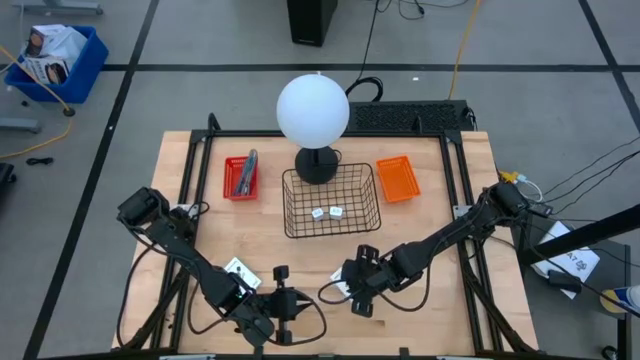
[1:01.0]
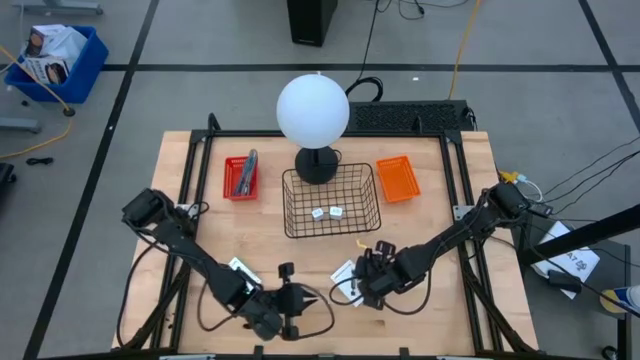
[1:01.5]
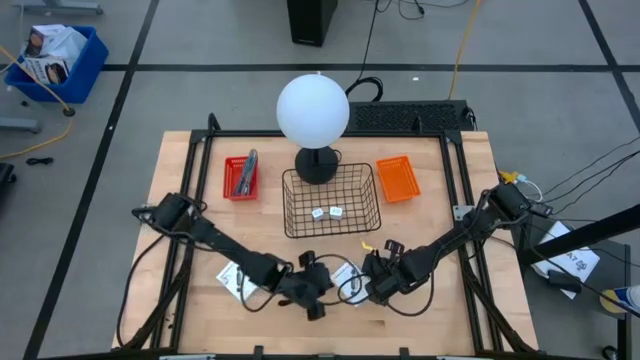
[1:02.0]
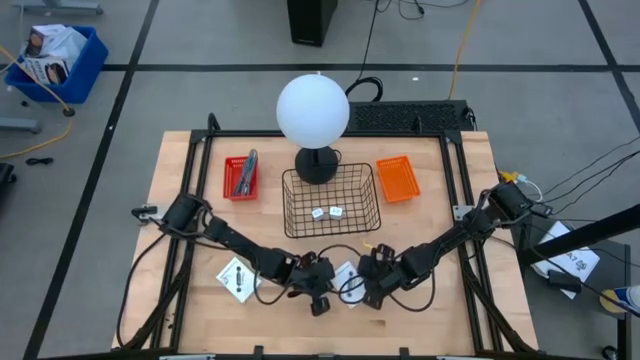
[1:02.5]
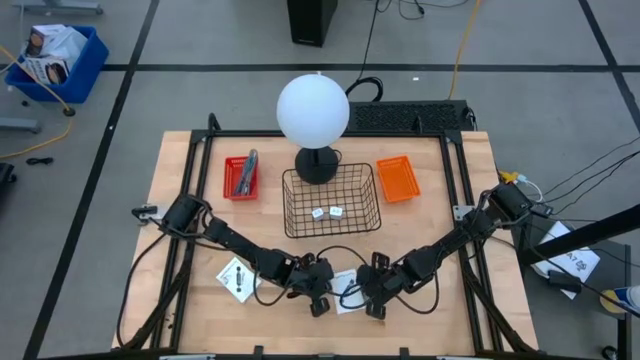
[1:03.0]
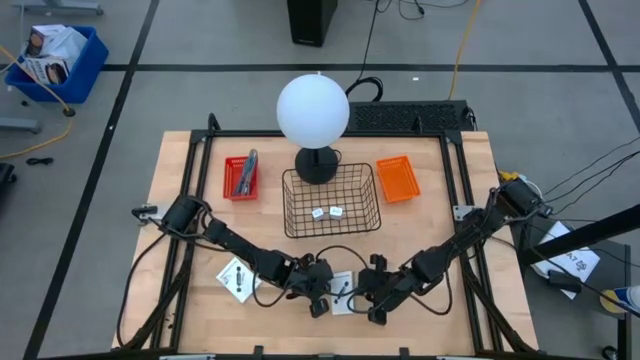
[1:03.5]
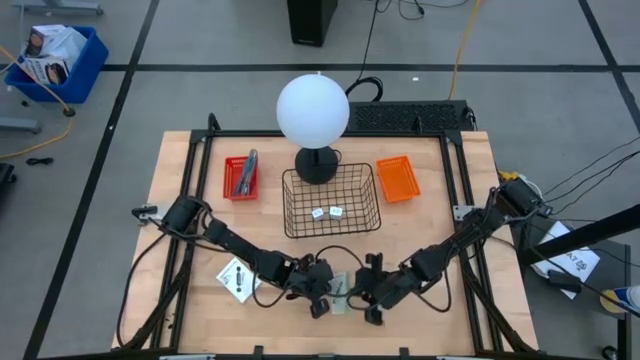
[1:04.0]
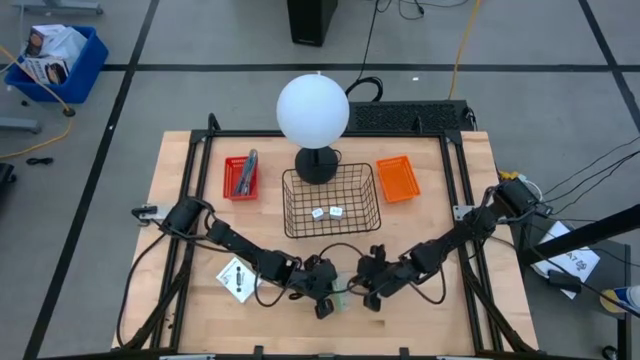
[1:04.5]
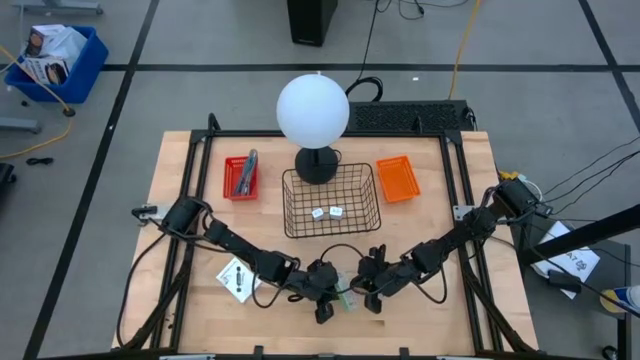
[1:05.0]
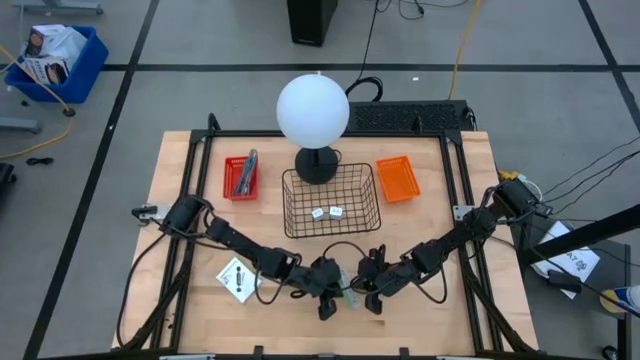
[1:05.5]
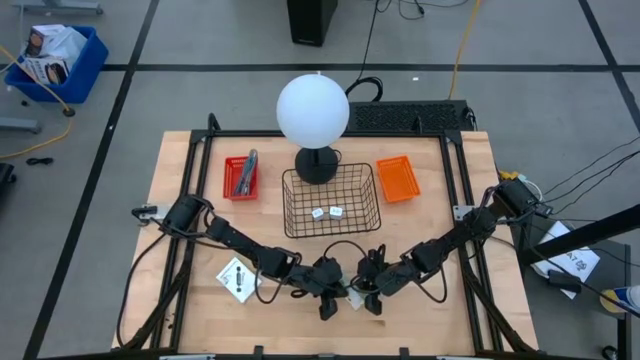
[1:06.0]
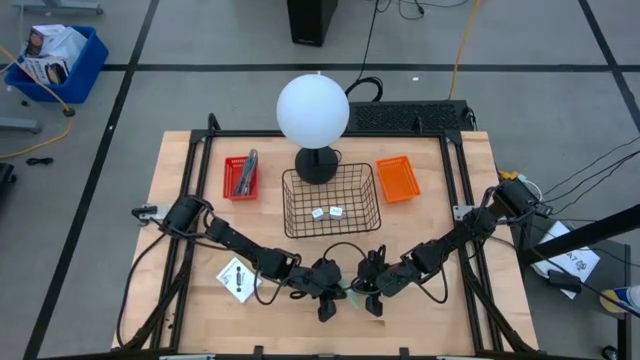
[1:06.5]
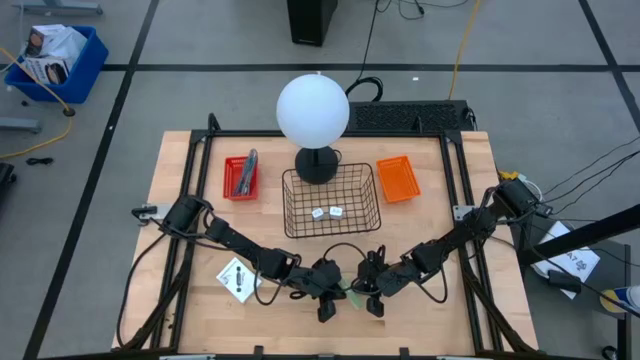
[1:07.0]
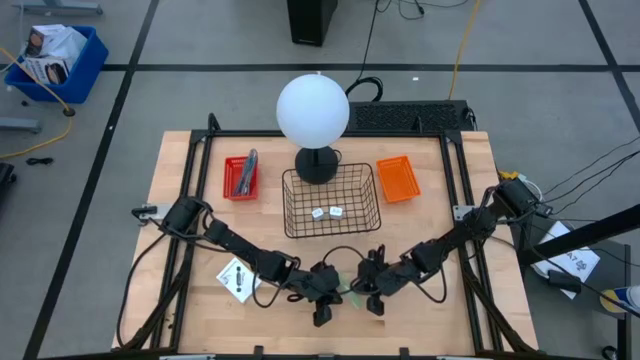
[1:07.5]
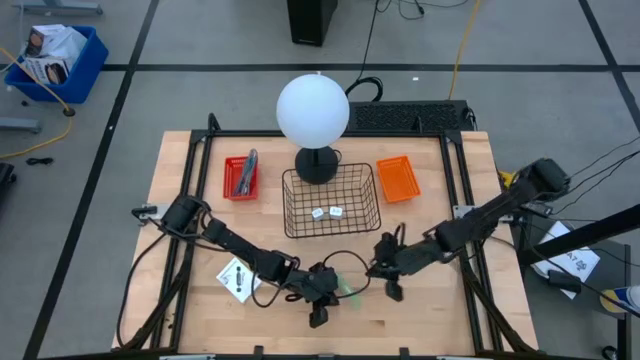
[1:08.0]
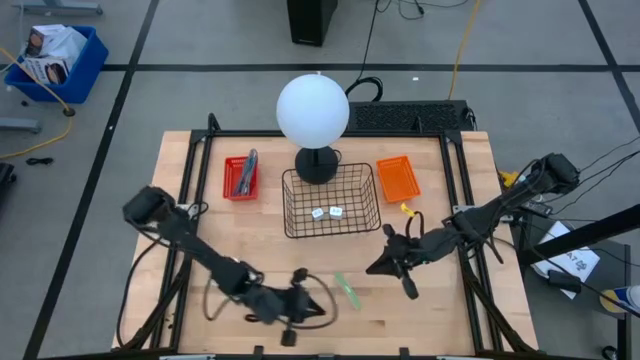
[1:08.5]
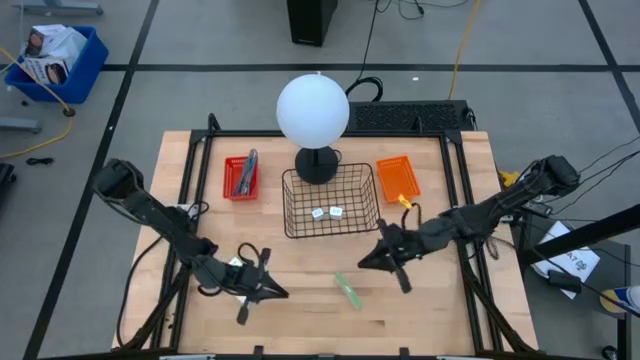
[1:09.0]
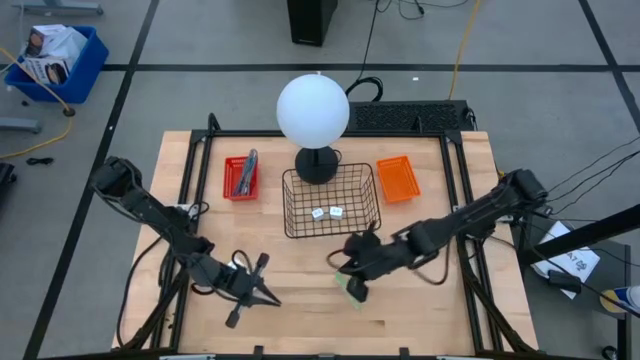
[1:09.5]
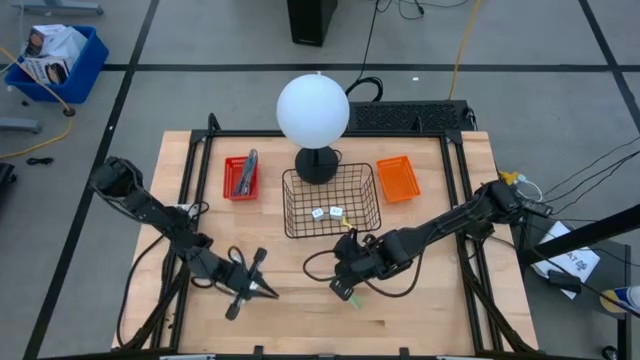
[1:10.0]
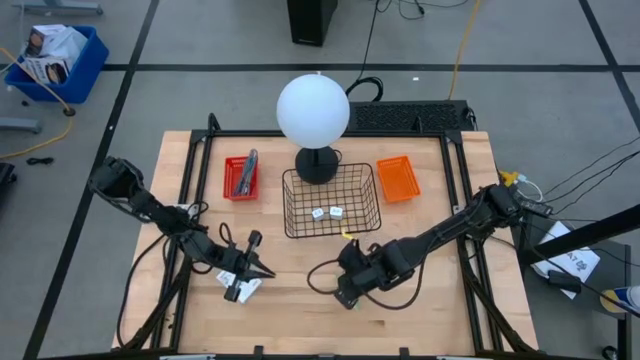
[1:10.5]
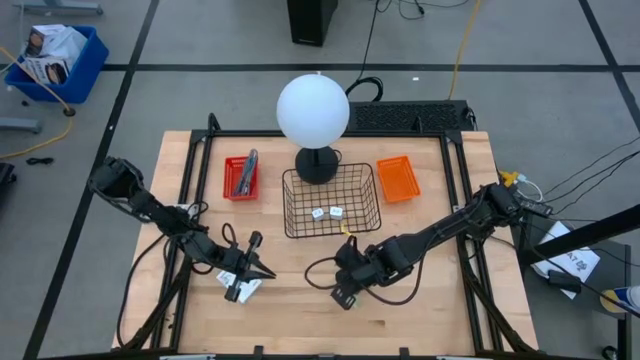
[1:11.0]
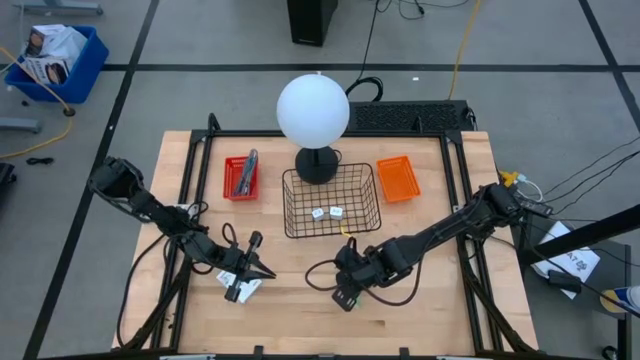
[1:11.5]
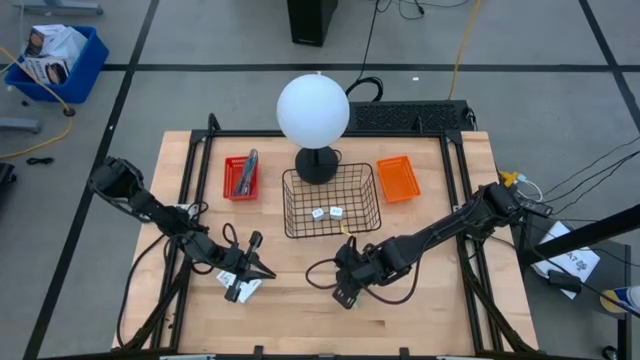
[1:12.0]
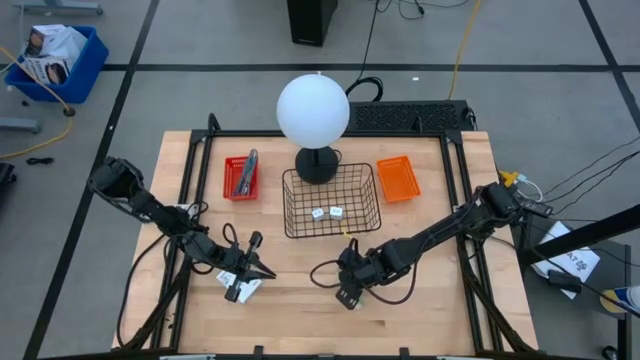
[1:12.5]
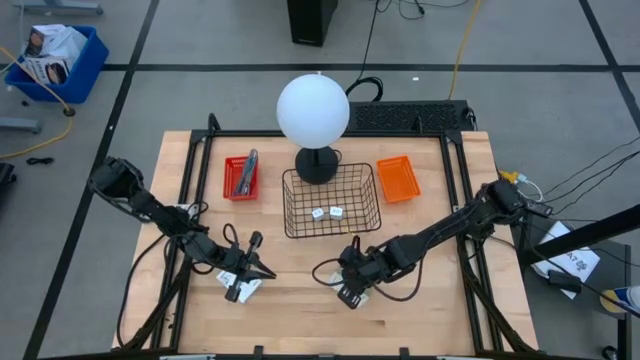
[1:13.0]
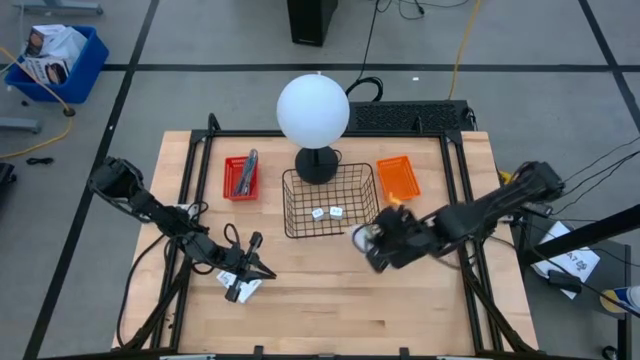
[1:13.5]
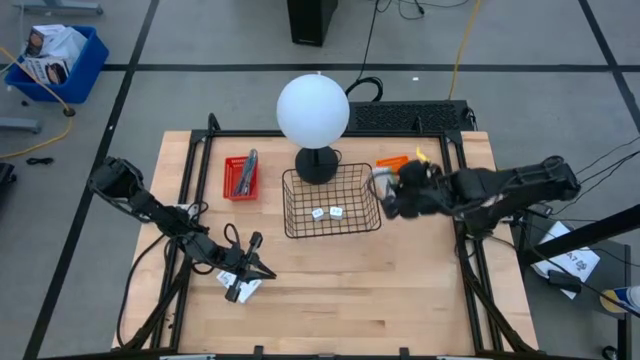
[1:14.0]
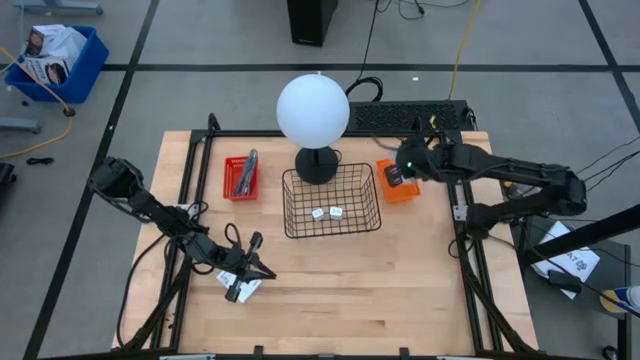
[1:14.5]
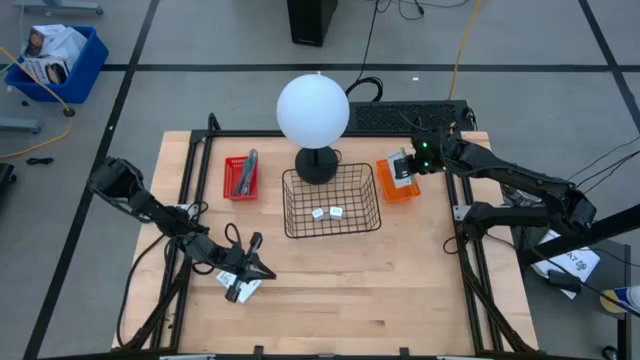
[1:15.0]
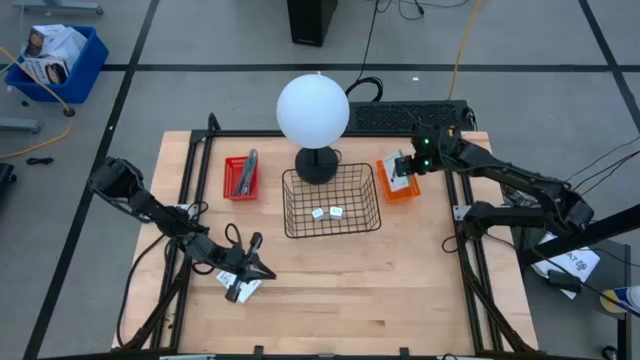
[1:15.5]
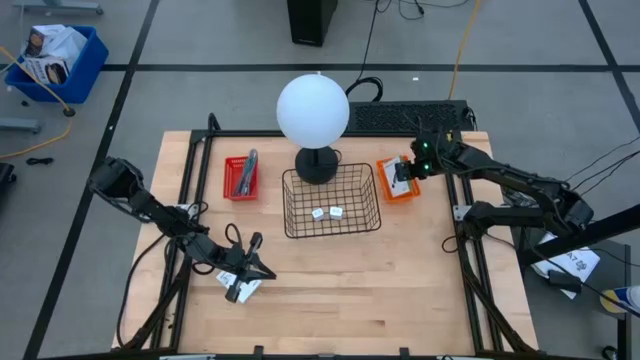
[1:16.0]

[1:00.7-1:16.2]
Task: Pick and place items into bin
Put the right card reader box into the orange bin

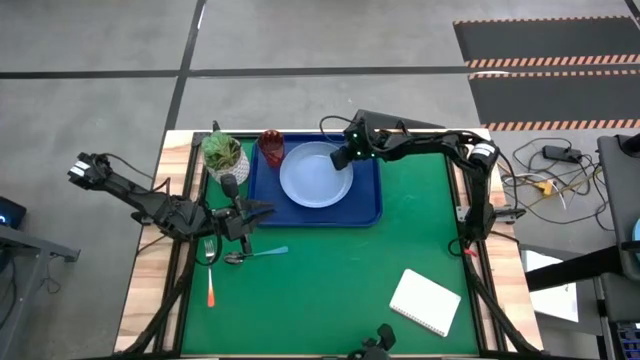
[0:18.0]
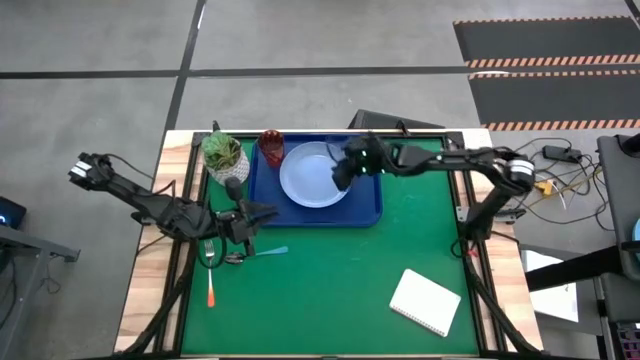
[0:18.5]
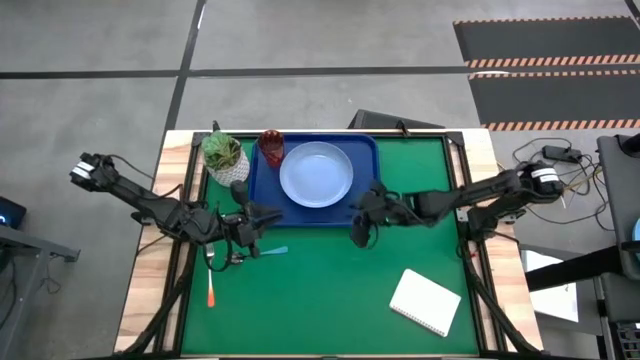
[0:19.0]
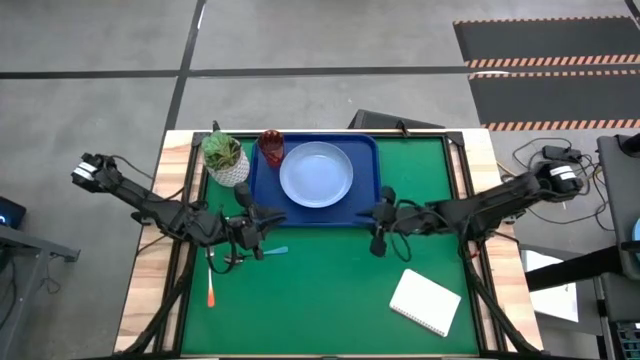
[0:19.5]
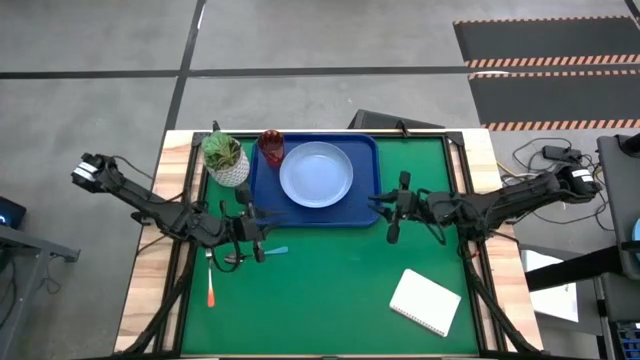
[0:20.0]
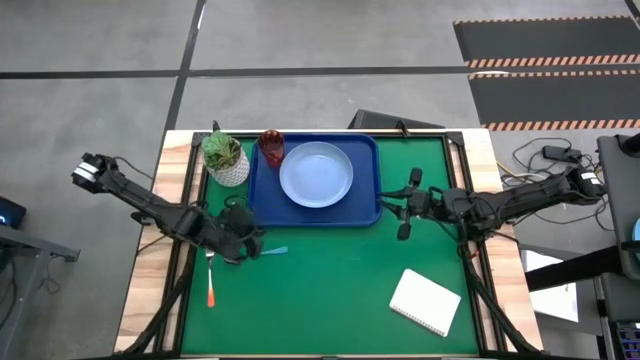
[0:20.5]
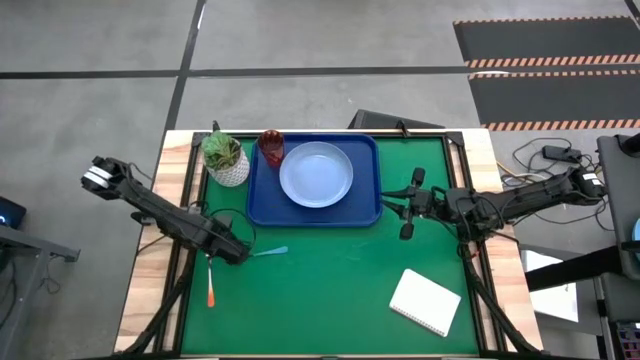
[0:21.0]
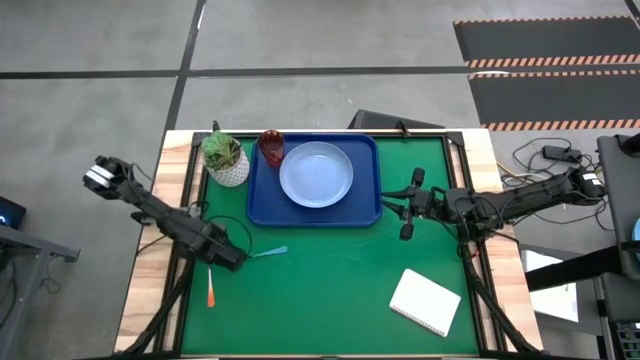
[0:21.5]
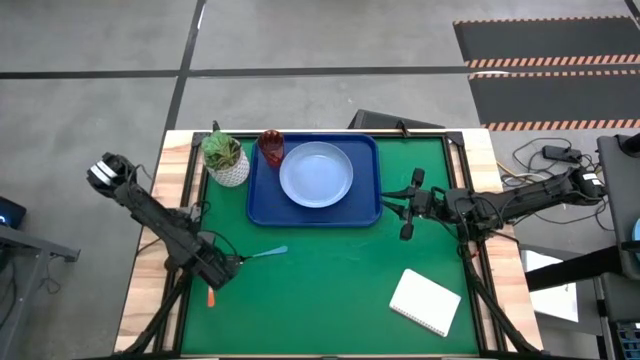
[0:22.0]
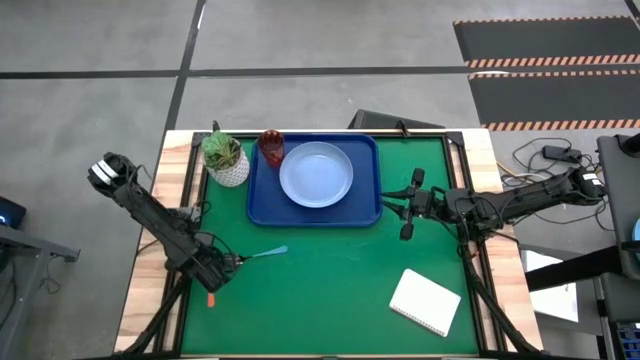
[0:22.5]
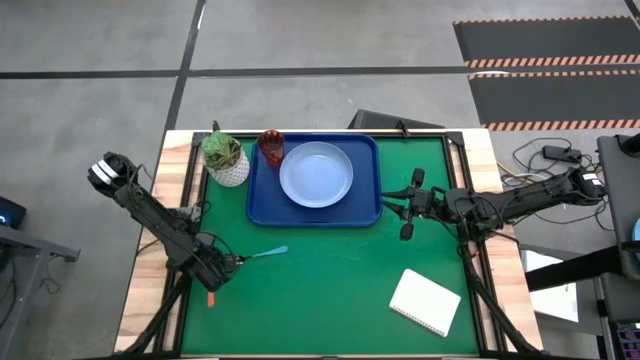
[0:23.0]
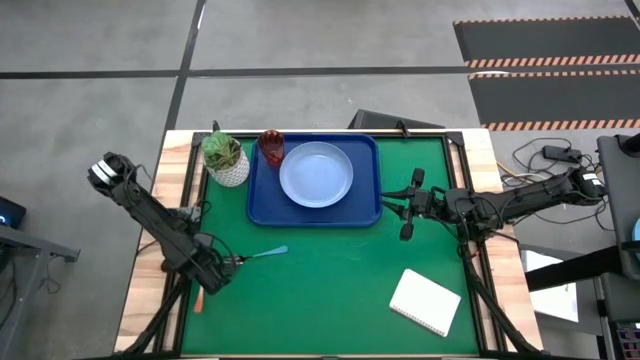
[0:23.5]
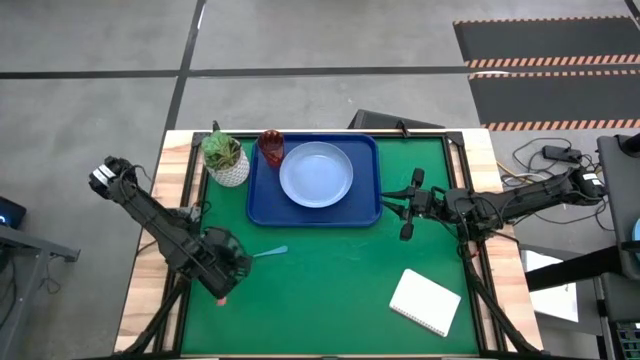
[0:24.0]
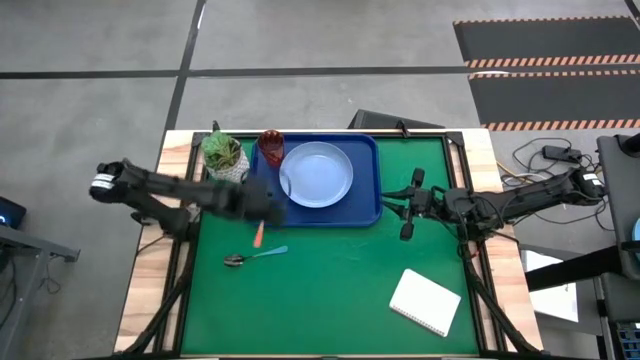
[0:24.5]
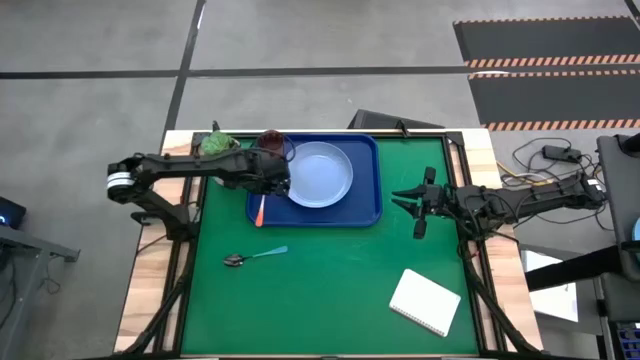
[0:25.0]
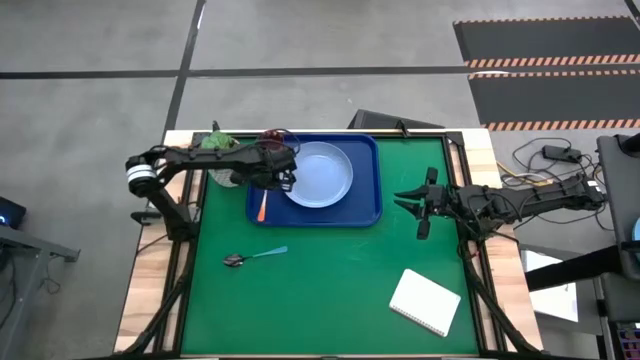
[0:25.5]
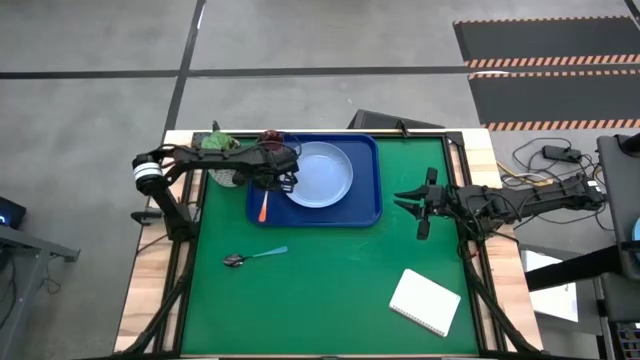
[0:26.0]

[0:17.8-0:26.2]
Task: Pick and place plate/cup/fork/spoon on tray
Put the orange fork on the blue tray to the left of the plate
